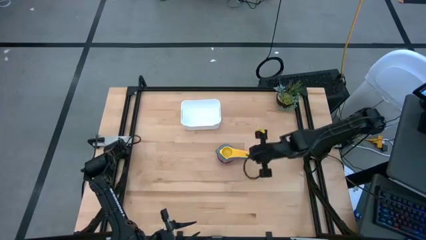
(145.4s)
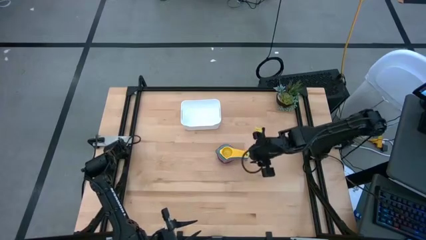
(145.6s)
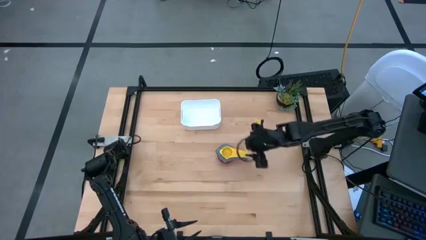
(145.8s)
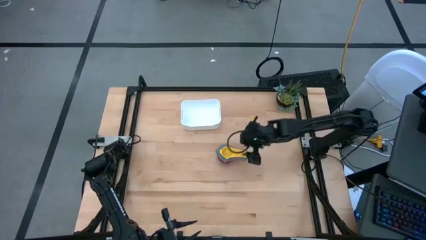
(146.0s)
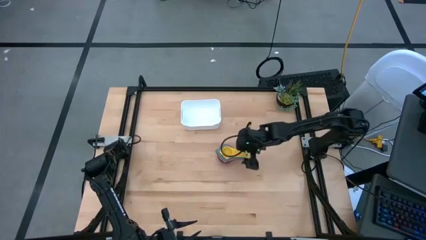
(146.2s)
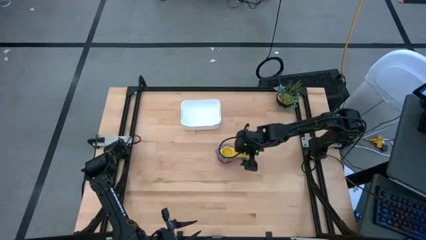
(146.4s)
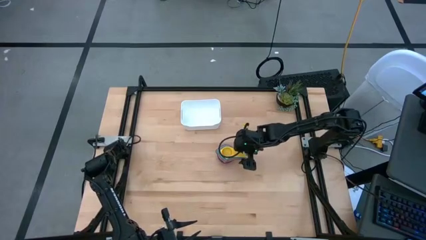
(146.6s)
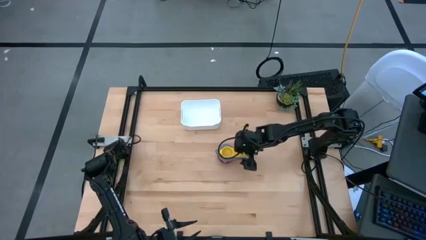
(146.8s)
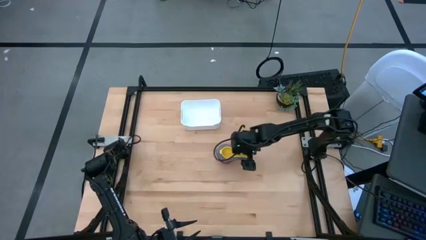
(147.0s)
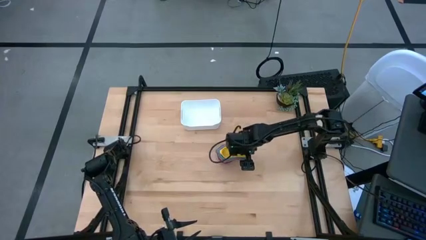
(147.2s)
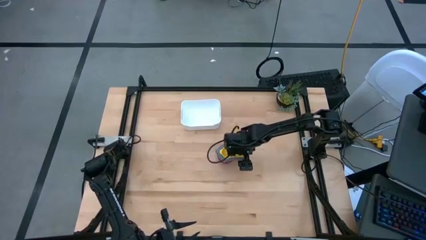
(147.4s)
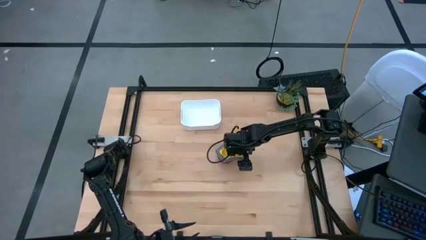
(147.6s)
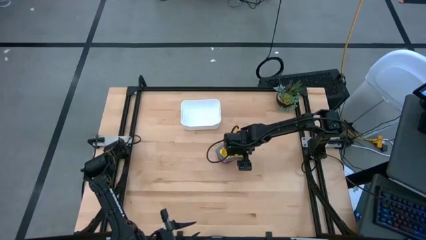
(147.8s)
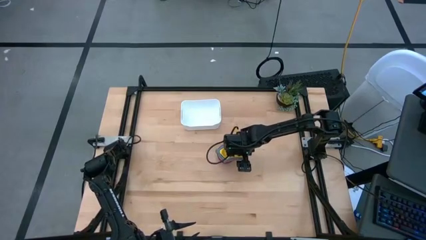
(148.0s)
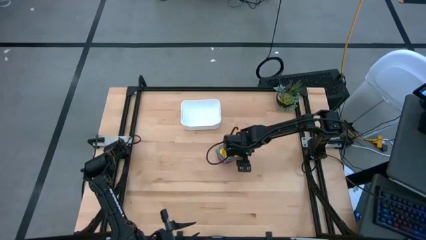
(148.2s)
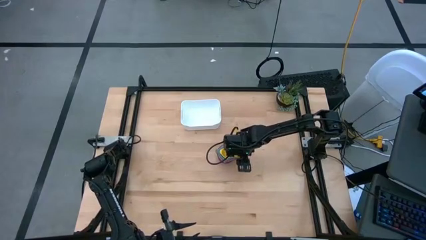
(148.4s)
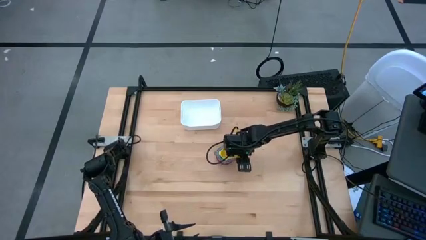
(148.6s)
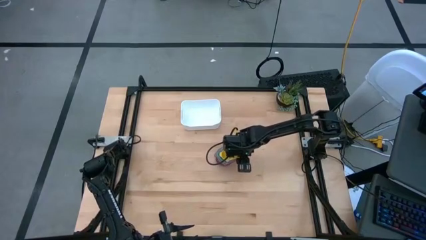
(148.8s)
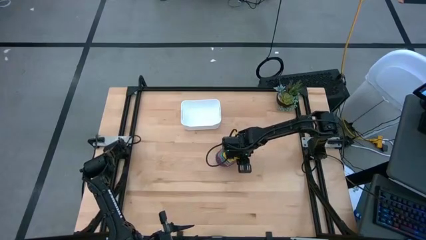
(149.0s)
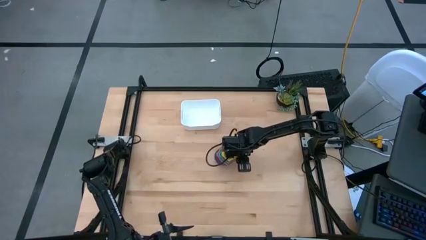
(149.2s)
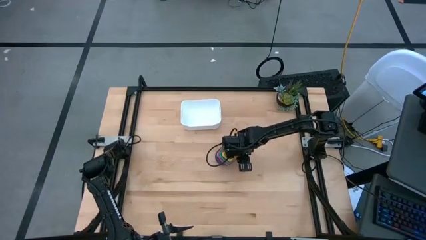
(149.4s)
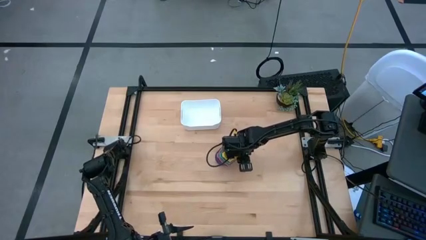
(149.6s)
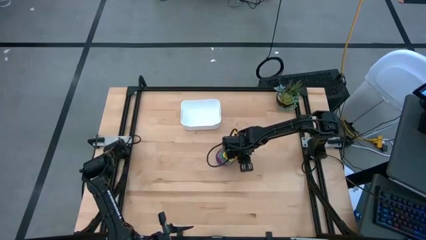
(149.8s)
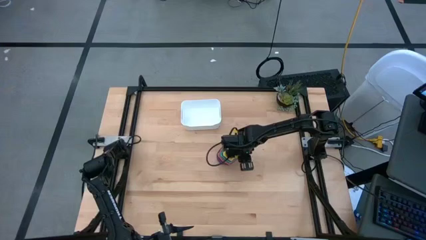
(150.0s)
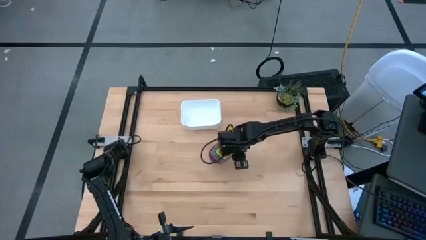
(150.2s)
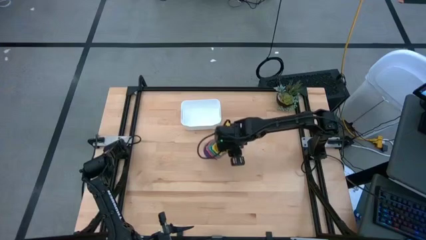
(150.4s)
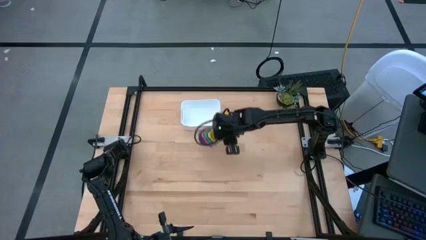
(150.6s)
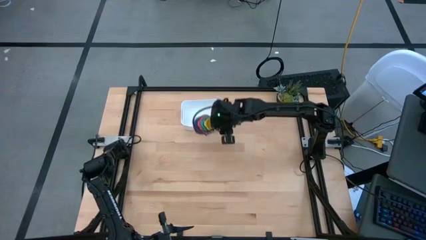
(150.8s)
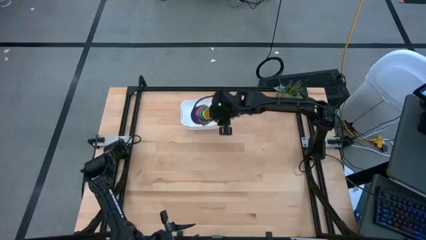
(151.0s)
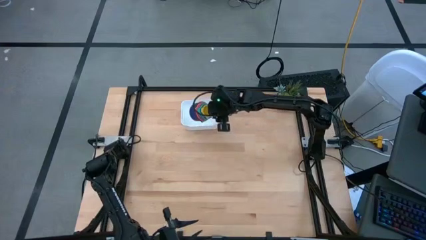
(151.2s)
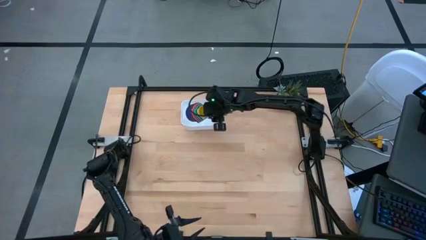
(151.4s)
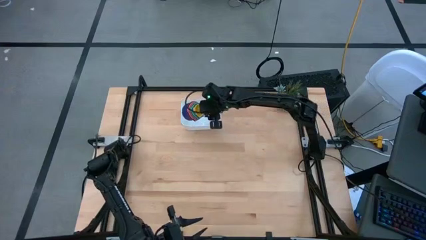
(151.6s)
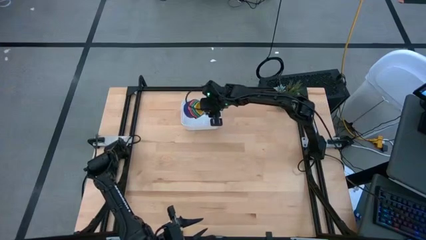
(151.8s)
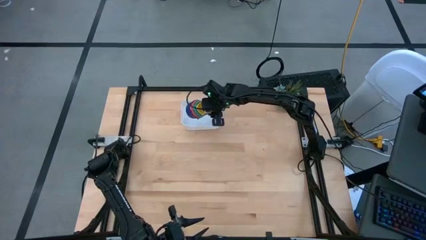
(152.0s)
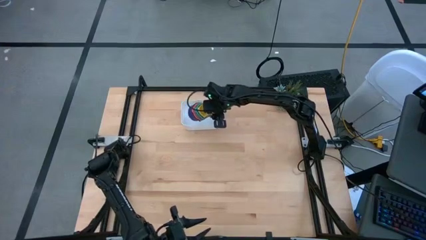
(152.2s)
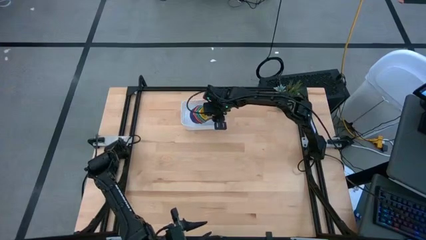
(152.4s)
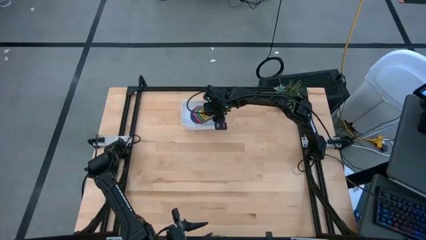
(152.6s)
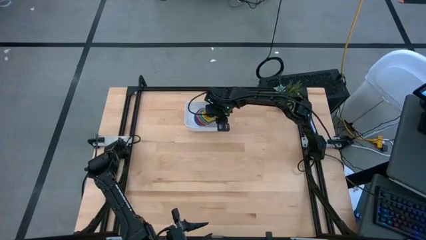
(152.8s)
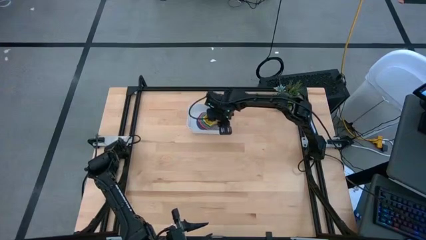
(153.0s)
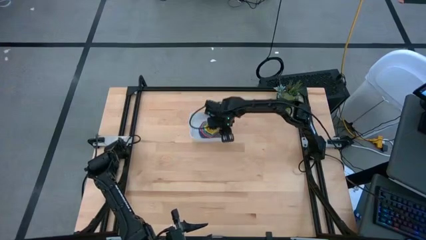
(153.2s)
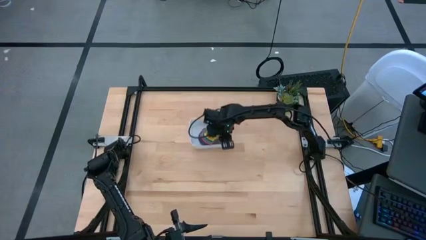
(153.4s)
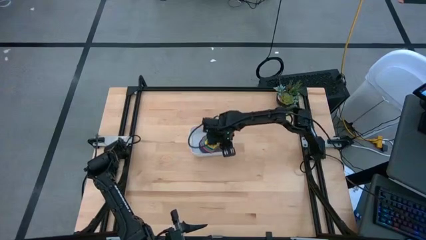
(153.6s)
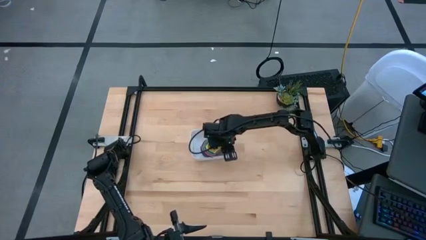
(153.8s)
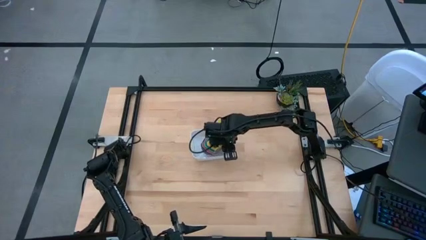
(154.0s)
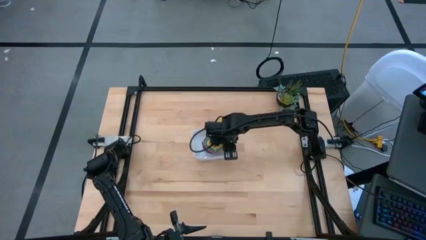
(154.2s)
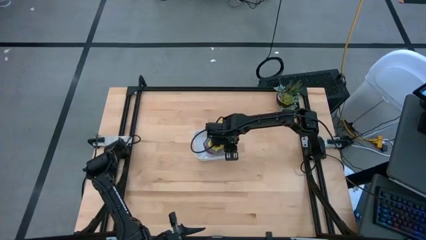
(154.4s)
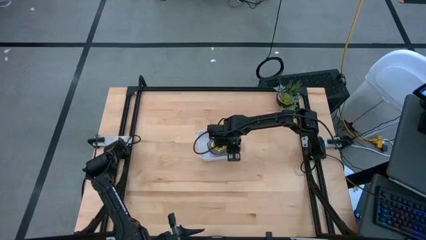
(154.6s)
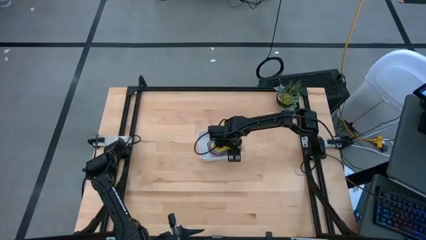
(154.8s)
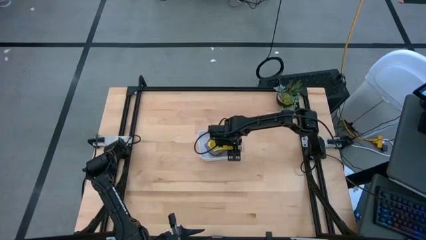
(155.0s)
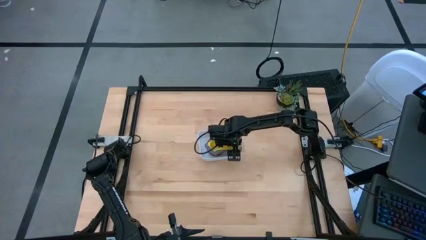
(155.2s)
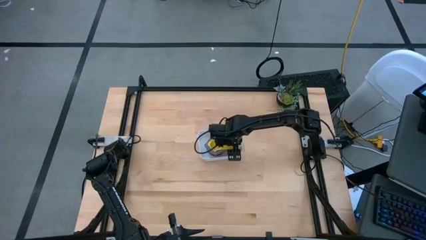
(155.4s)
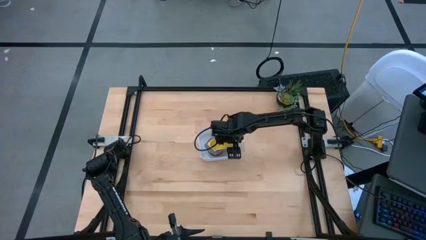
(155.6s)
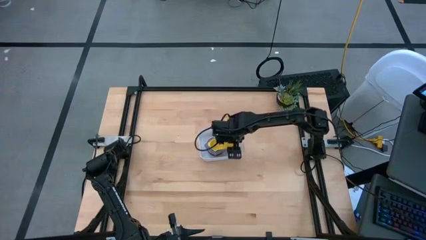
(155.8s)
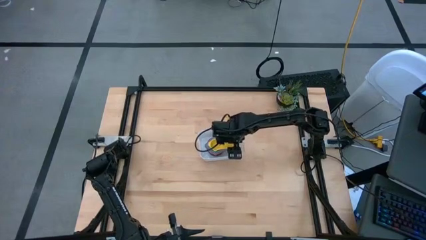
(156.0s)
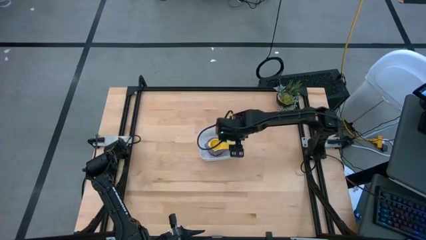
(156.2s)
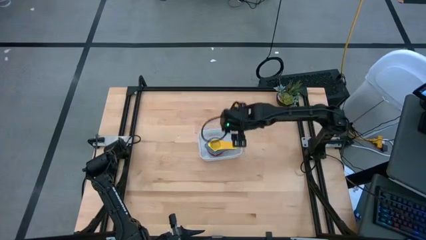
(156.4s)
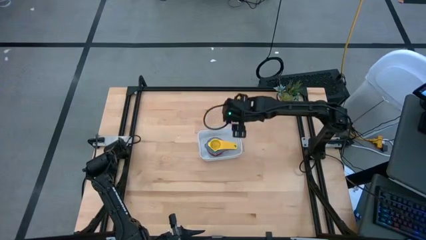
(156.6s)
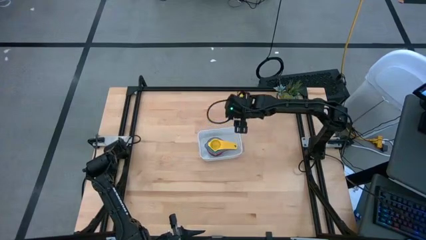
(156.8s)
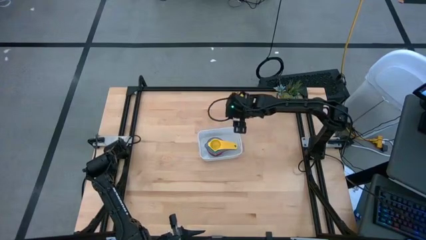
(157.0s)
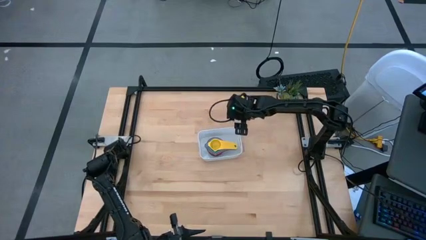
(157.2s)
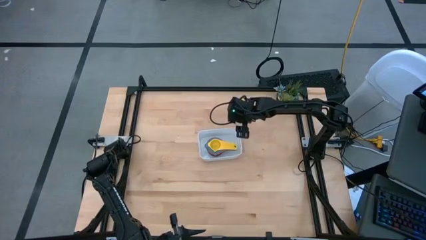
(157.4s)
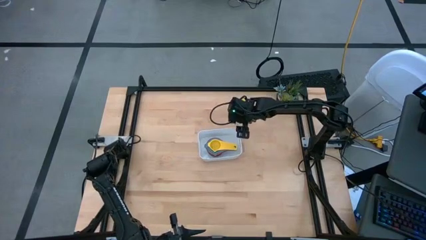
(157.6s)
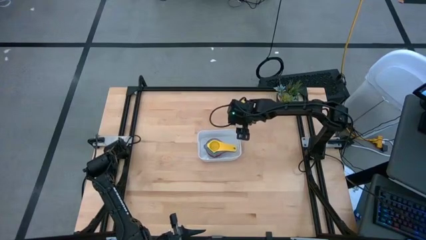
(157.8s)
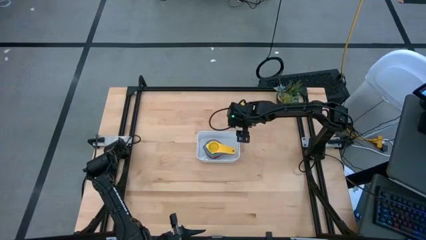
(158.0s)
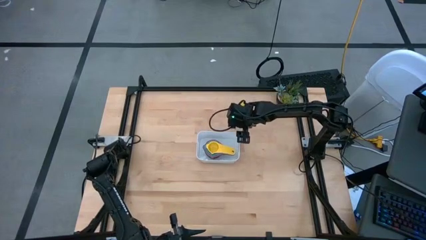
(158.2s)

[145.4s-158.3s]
Task: Nest measuring cups in basket
Put the stacked measuring cups into the bin
